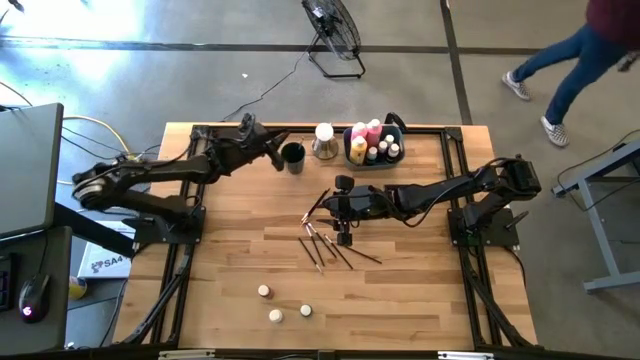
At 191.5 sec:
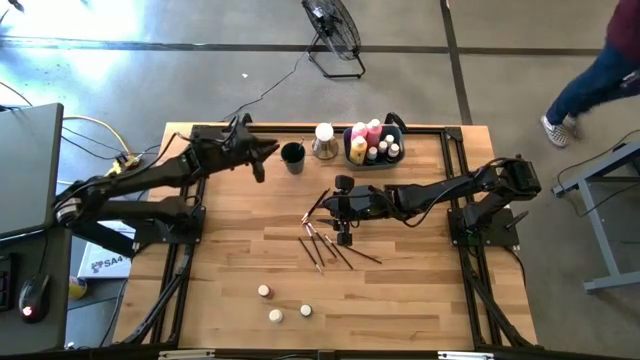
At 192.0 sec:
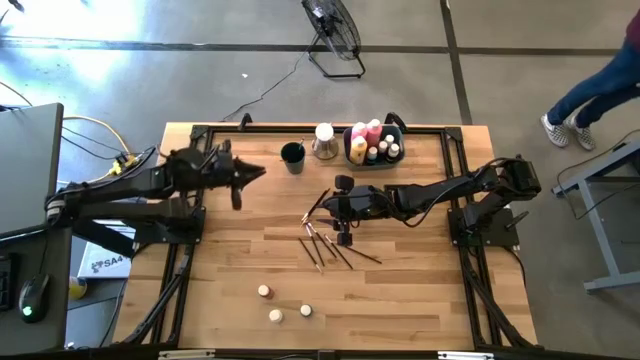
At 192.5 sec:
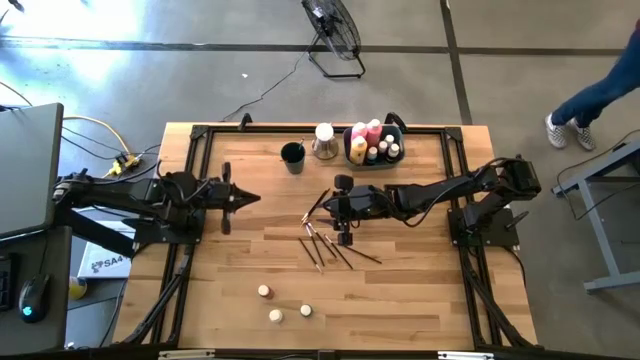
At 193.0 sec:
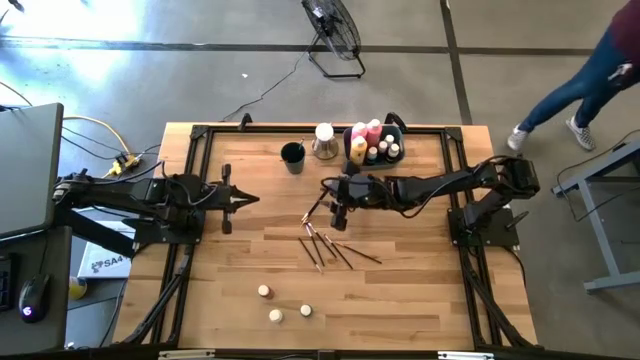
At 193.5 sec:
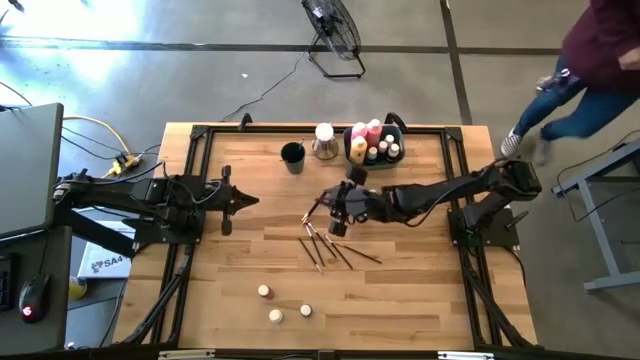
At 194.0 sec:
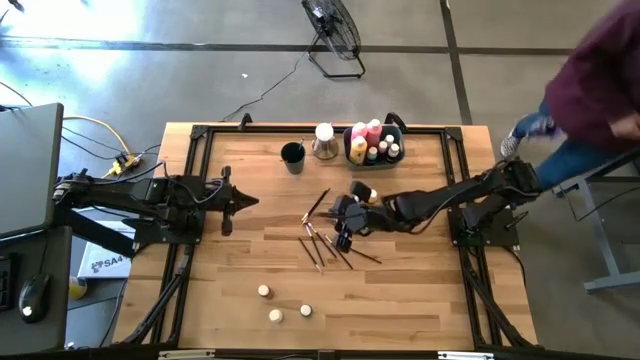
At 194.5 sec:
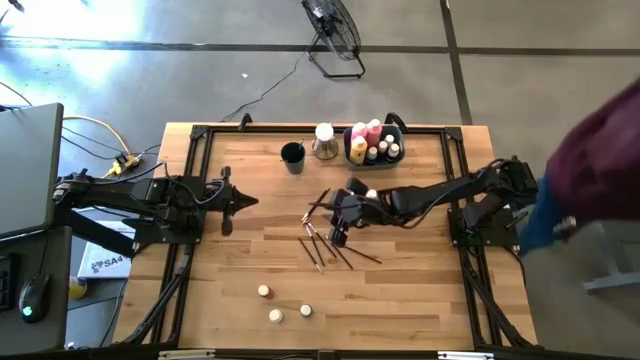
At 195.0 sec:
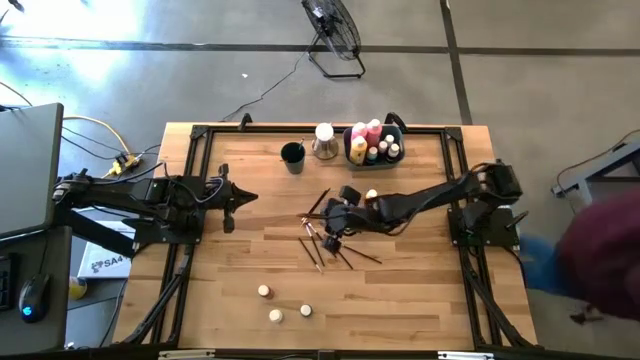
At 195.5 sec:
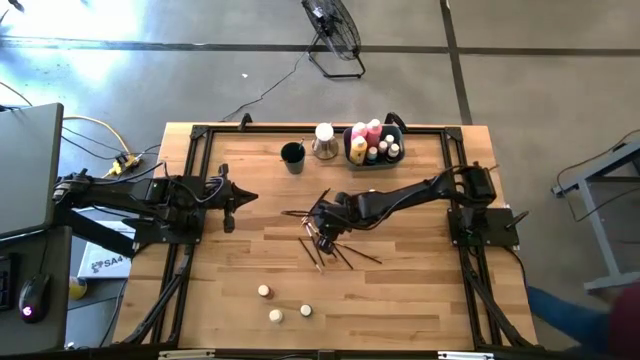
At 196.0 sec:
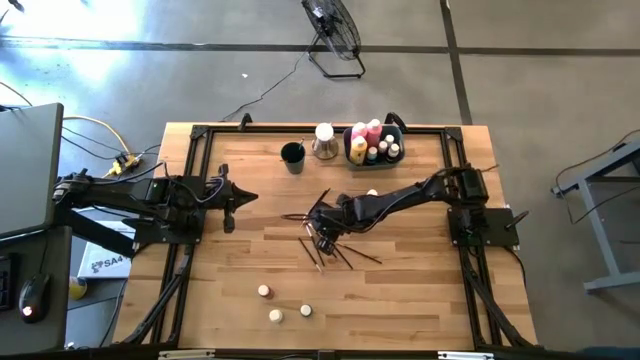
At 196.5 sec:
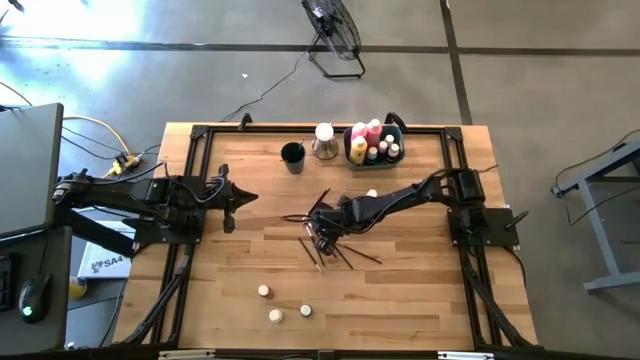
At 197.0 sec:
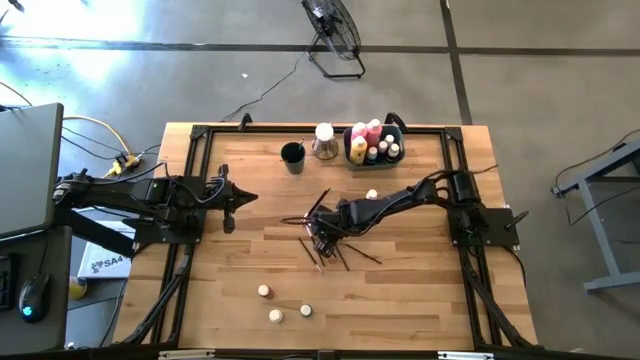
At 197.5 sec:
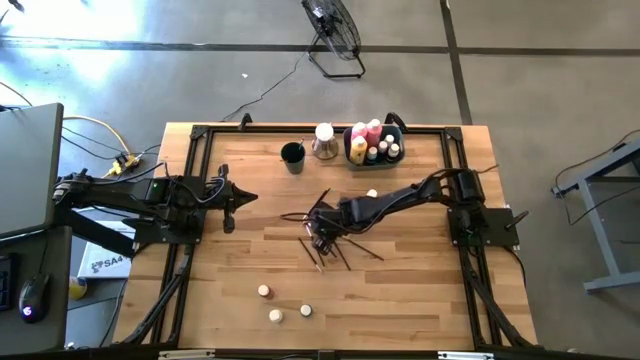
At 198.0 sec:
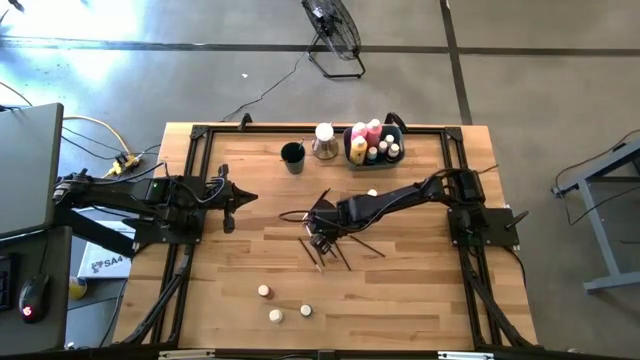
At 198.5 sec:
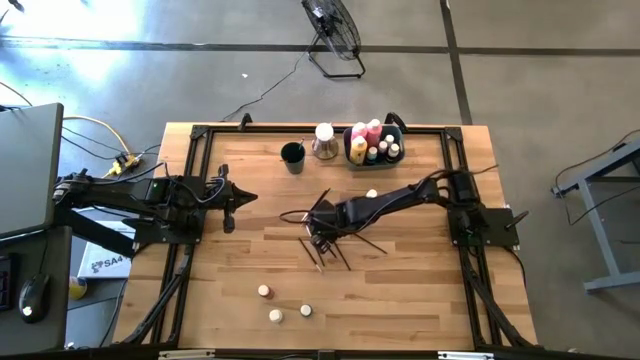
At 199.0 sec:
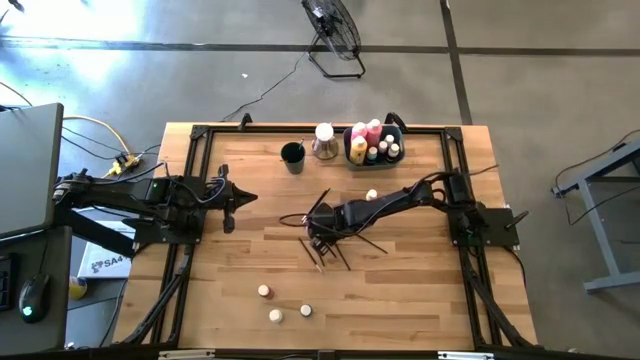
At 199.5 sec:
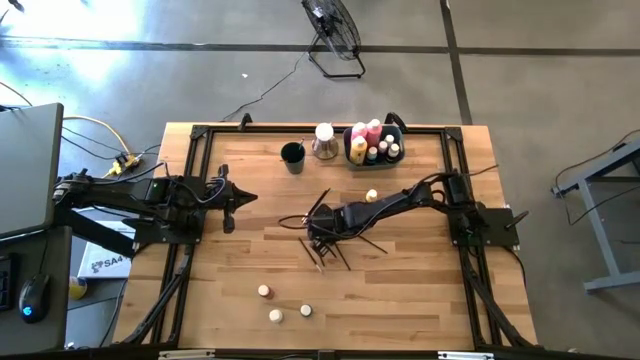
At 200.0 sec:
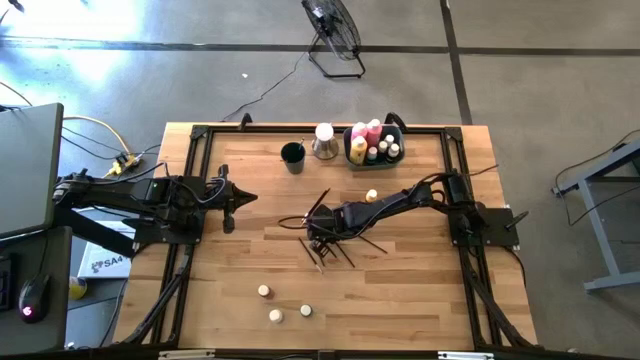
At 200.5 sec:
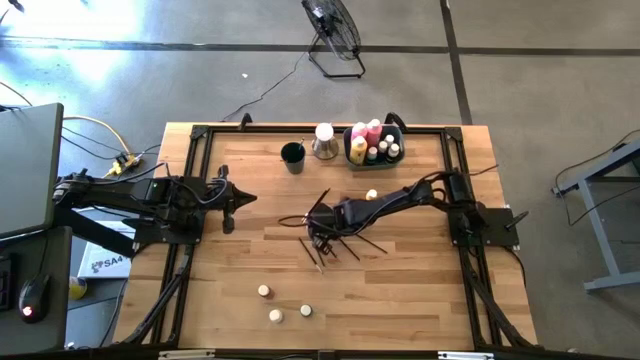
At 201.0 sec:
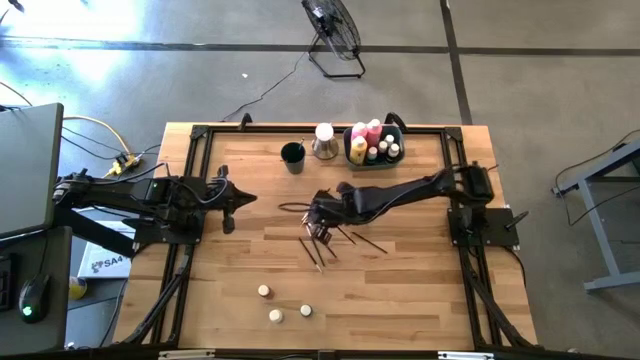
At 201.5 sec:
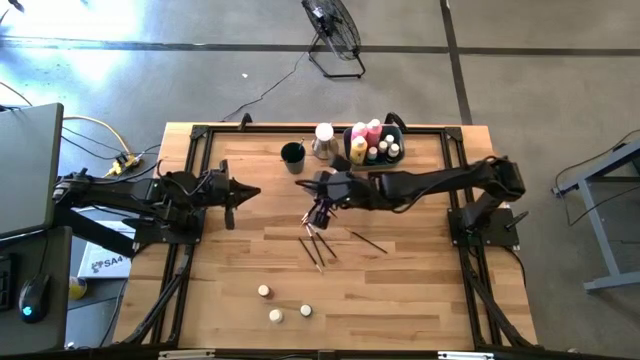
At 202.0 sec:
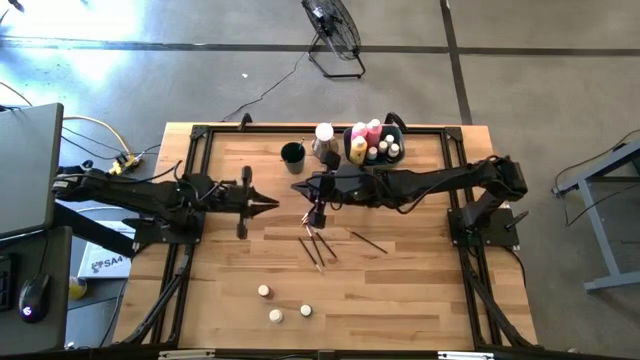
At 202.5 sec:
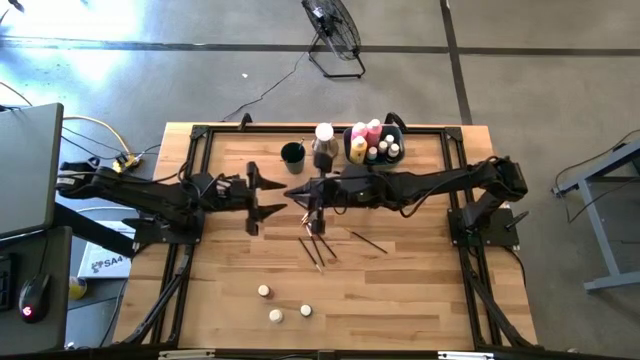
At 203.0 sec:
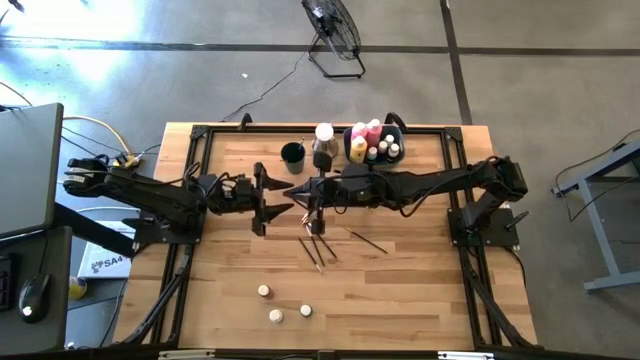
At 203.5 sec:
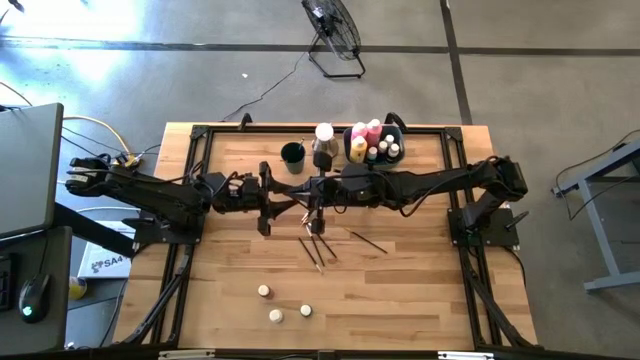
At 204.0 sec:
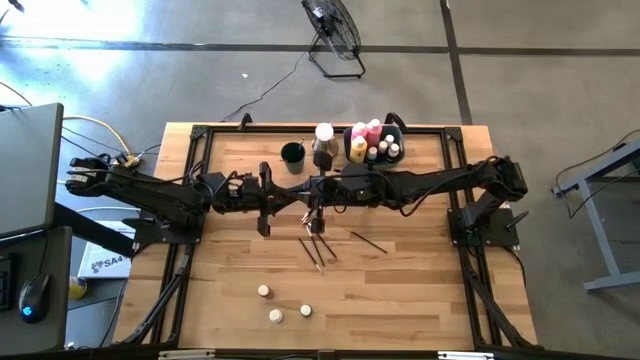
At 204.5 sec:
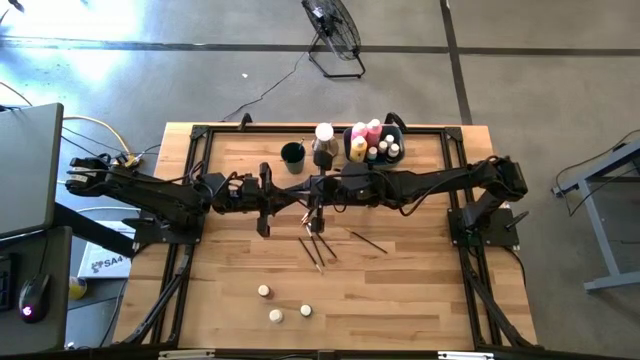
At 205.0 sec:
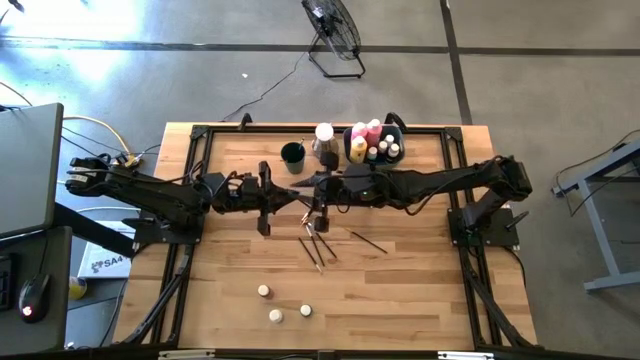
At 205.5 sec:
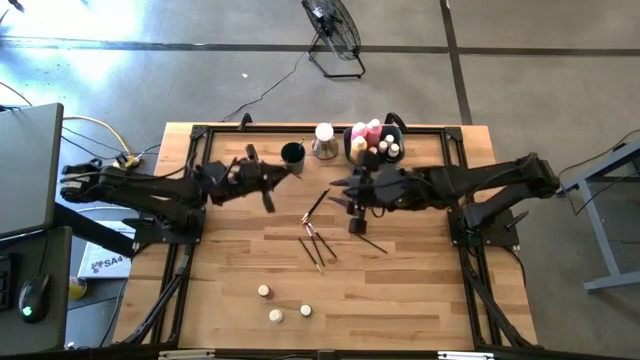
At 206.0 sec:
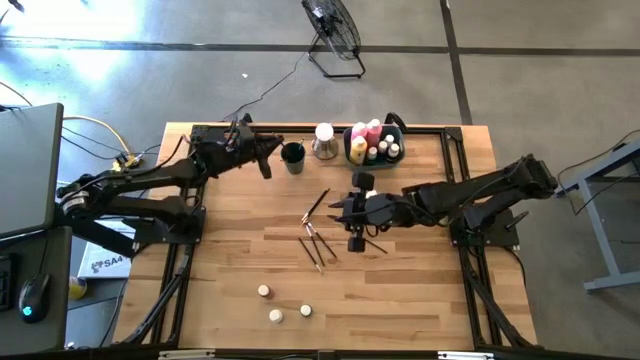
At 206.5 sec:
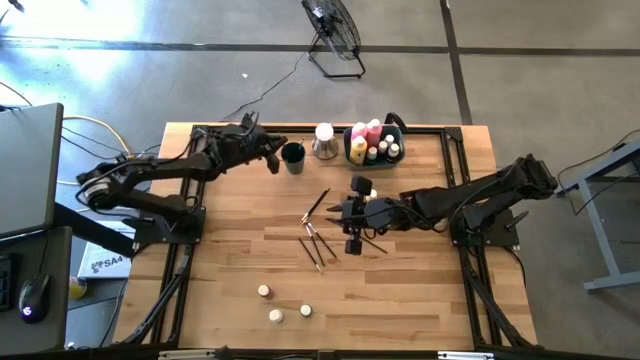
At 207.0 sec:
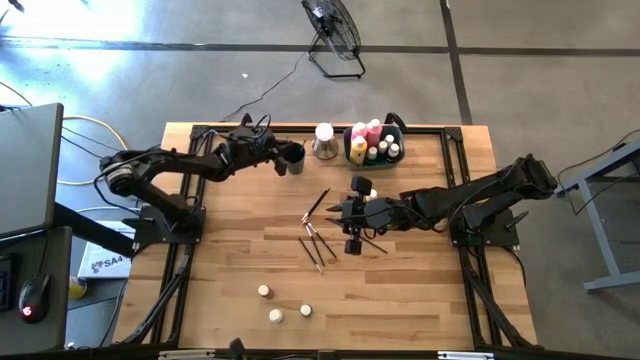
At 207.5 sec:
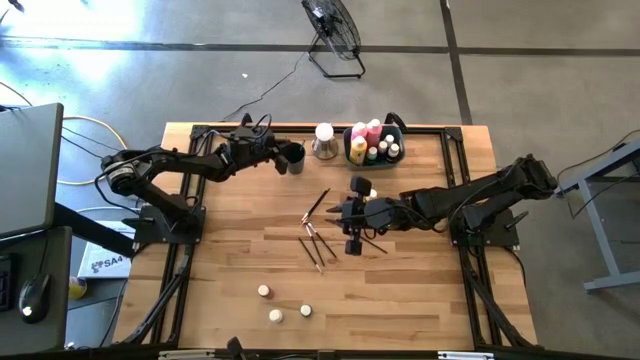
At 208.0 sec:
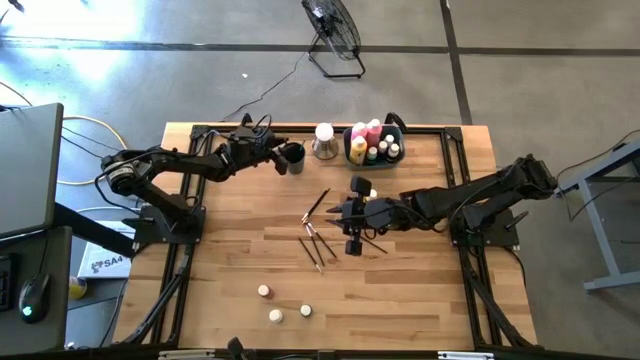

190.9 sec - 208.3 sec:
Task: Pick & Place Paint Supplies
Put the silver paintbrush into the blue cup
